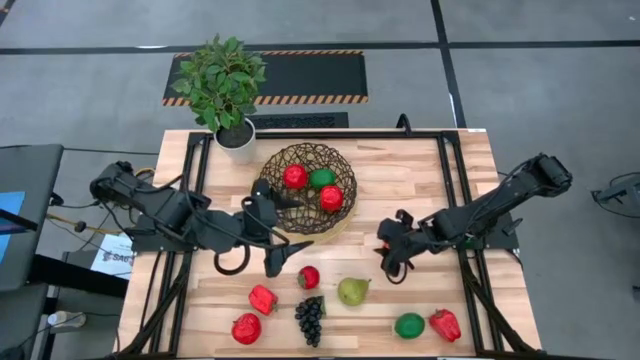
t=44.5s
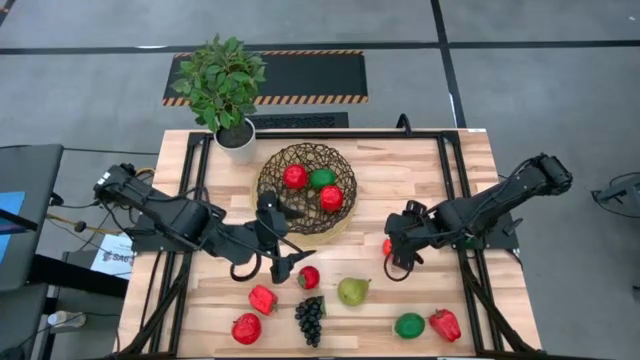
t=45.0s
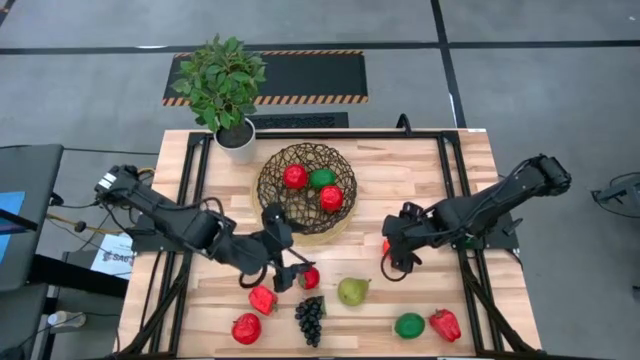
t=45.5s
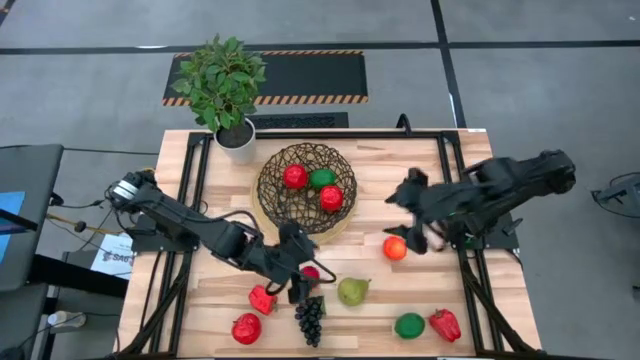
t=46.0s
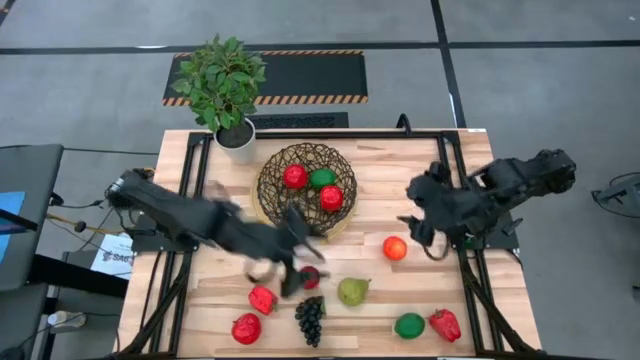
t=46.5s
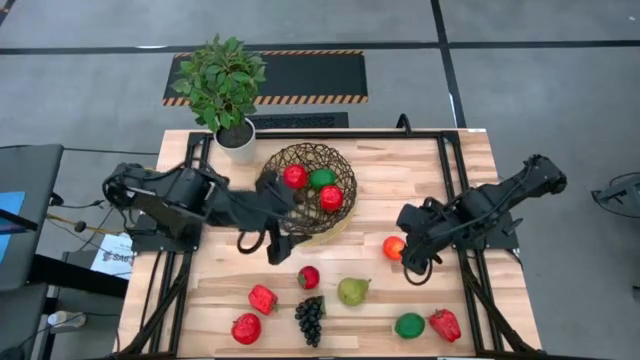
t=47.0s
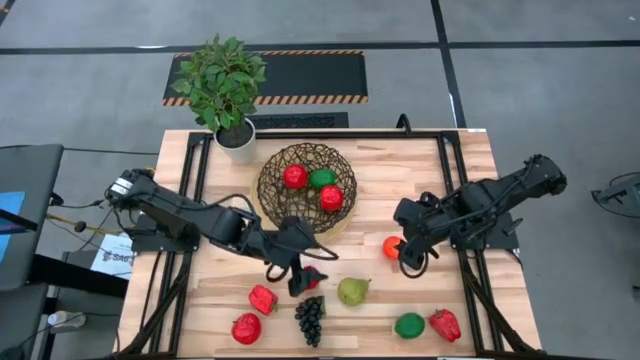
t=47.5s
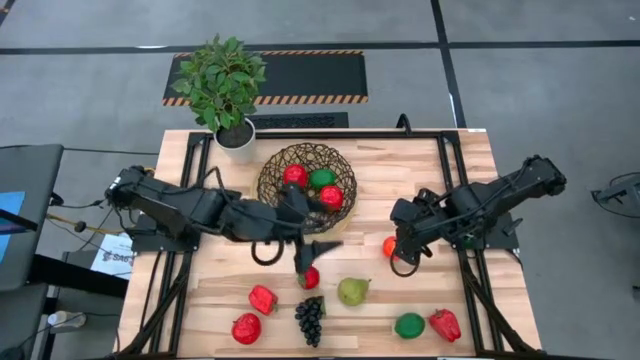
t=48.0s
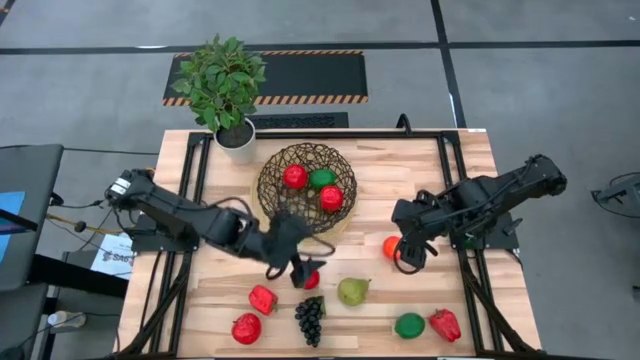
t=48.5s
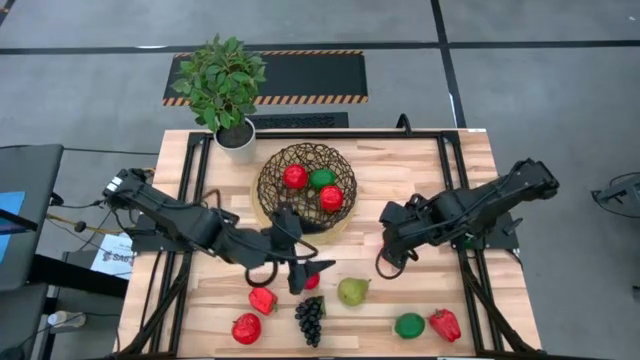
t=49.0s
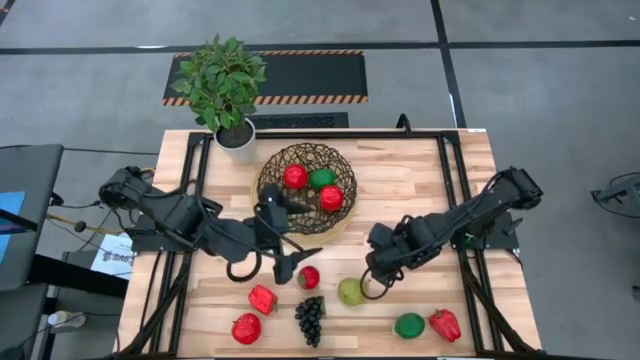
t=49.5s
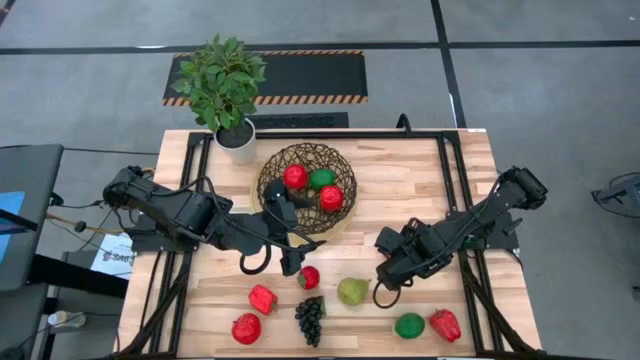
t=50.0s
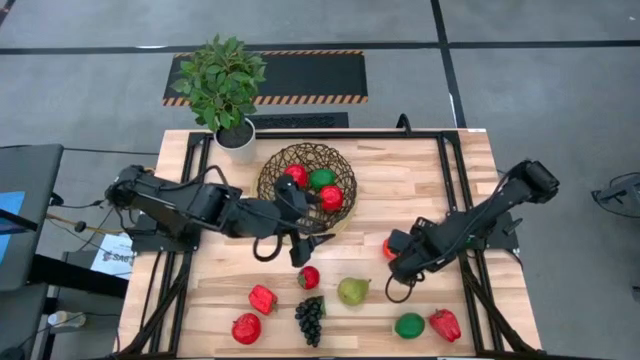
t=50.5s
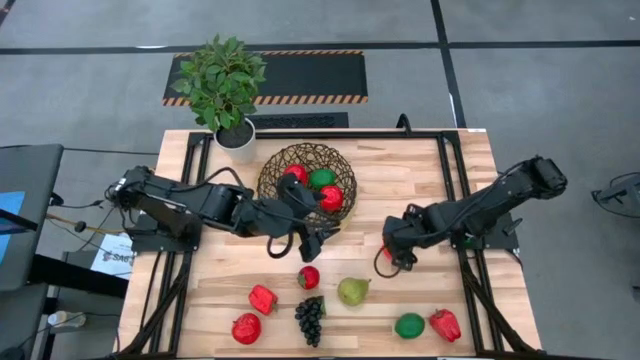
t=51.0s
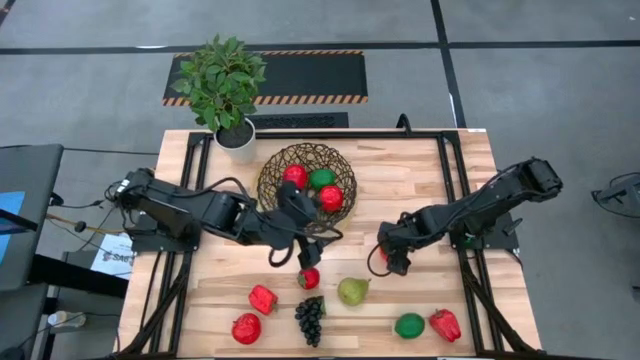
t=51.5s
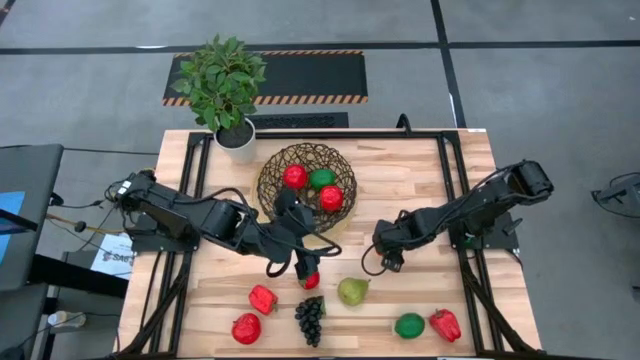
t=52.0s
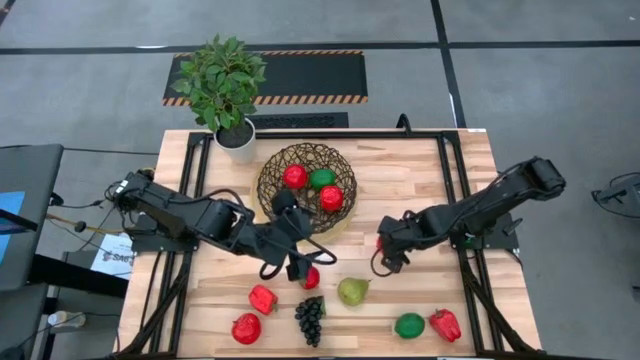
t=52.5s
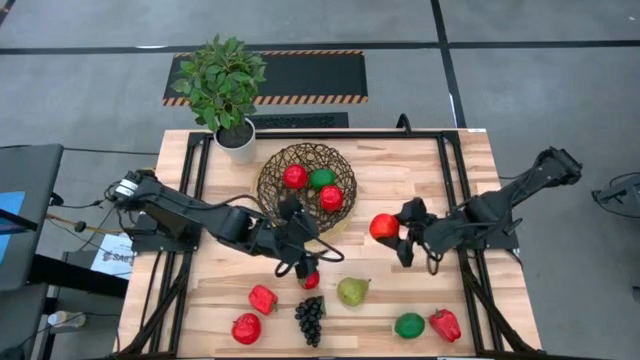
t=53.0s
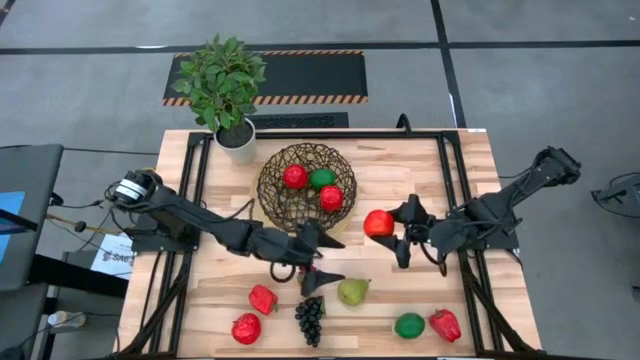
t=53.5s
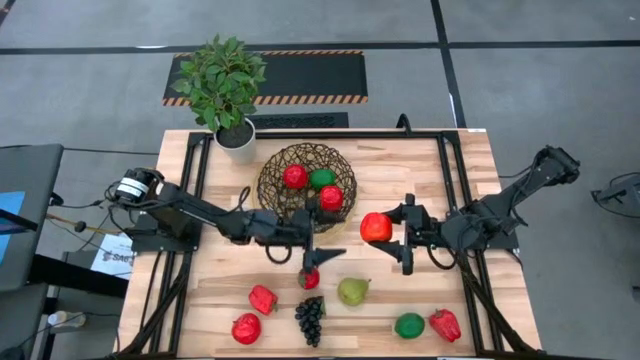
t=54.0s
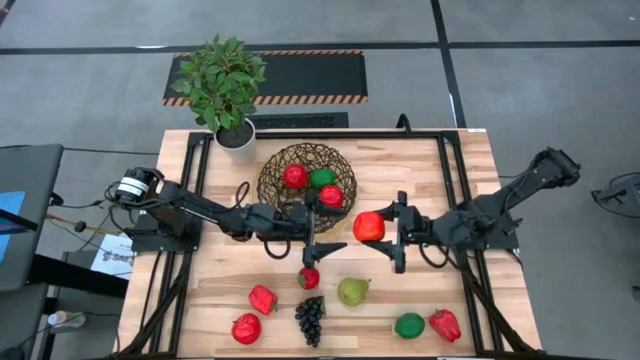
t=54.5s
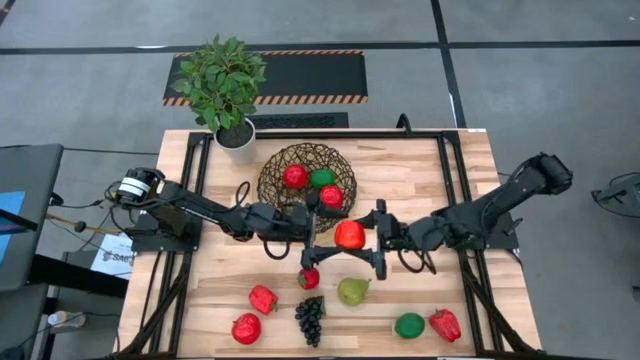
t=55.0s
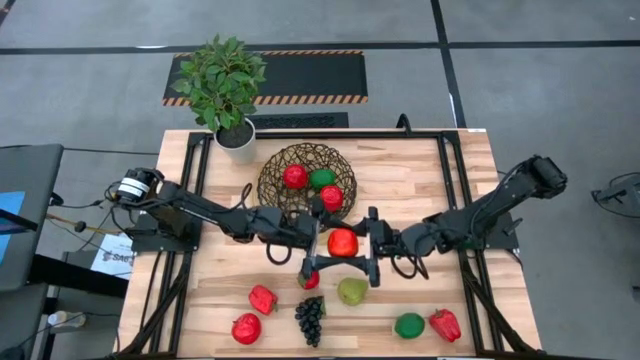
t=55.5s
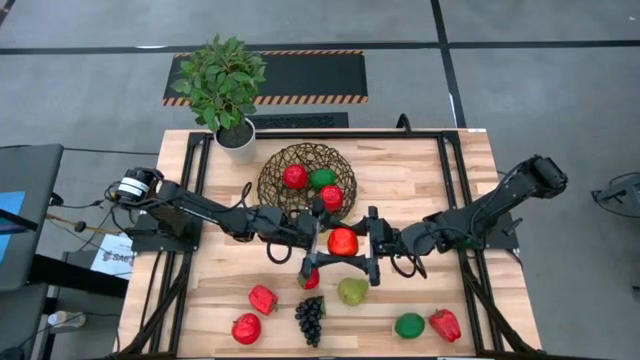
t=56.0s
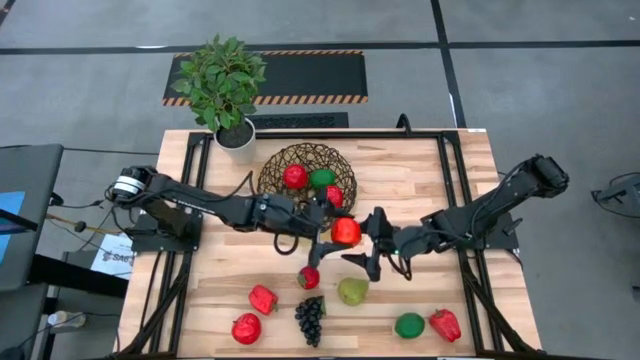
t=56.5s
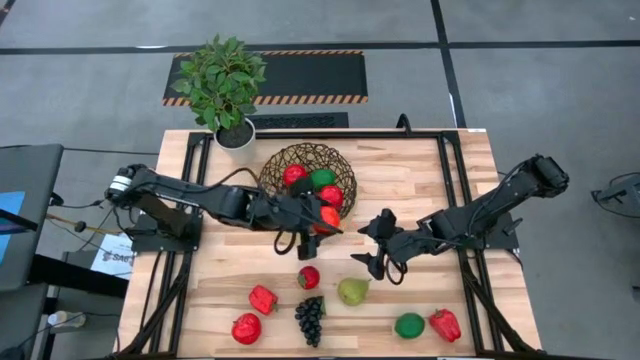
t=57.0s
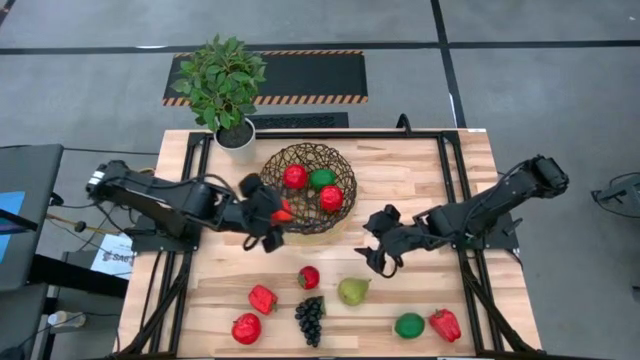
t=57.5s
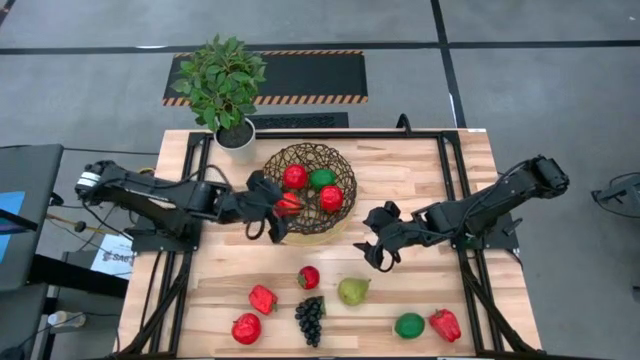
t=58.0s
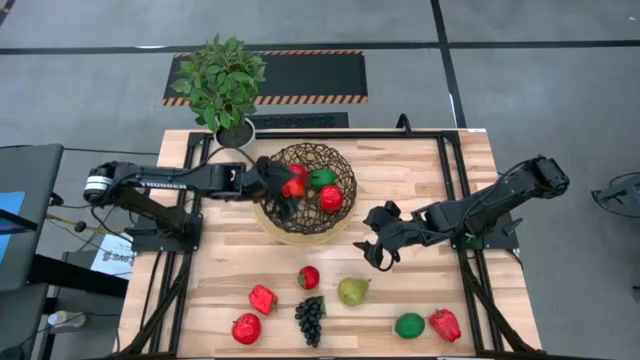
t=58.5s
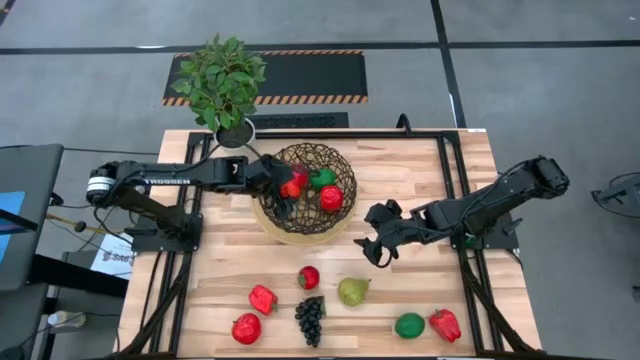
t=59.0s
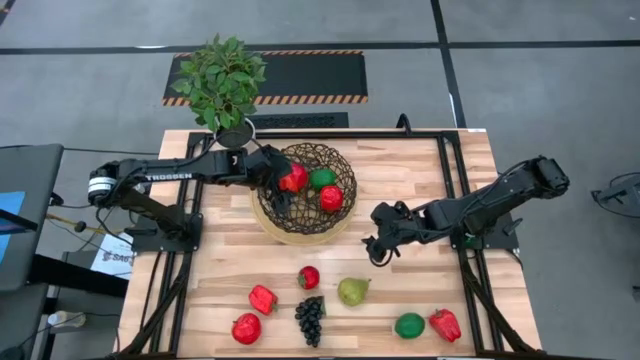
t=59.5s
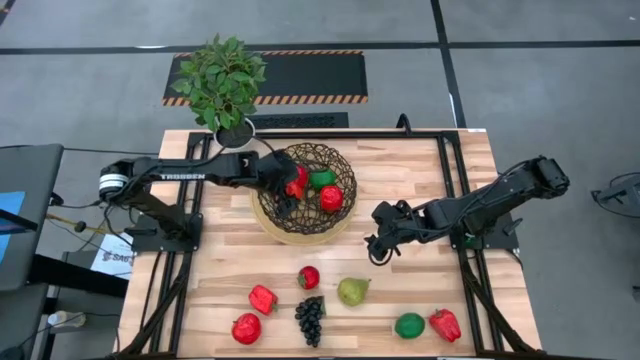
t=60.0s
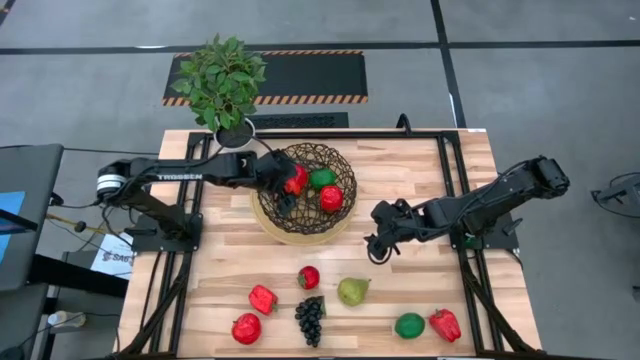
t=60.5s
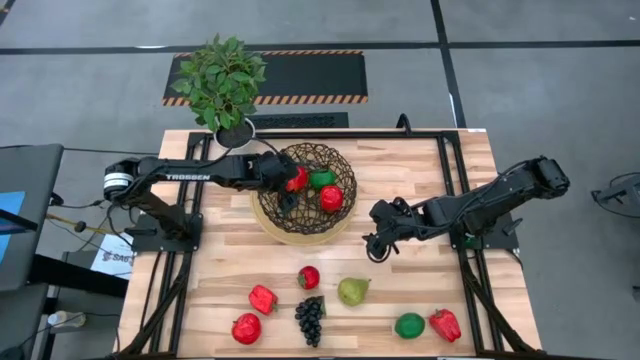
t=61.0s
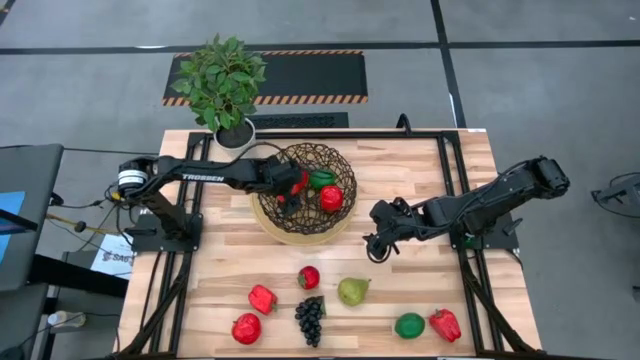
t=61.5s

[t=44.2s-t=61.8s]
Task: Build produce basket
Put the orange apple into the basket

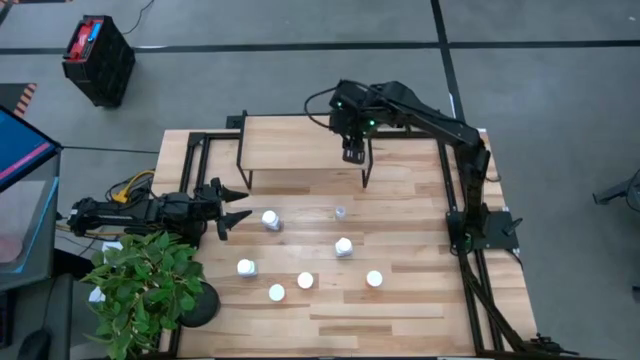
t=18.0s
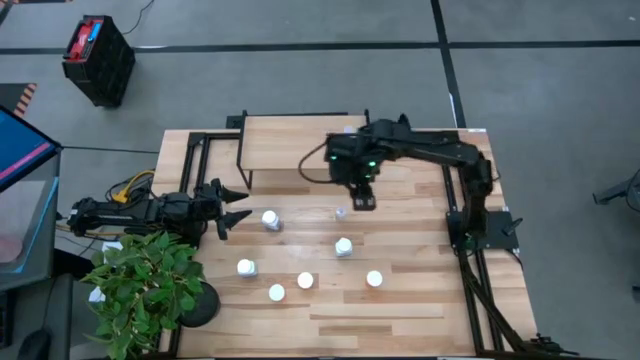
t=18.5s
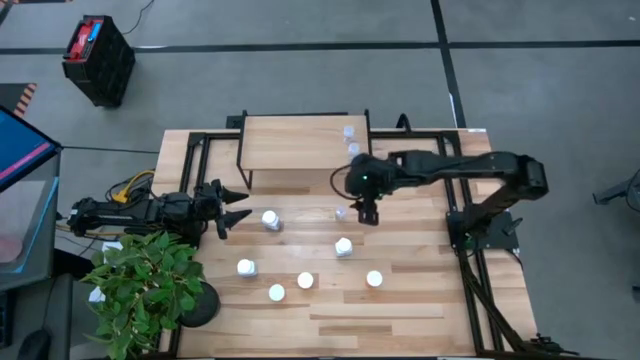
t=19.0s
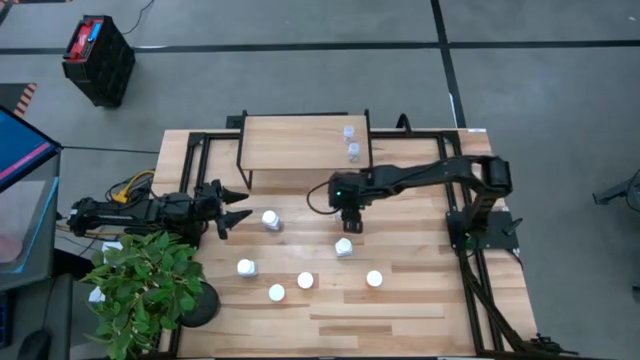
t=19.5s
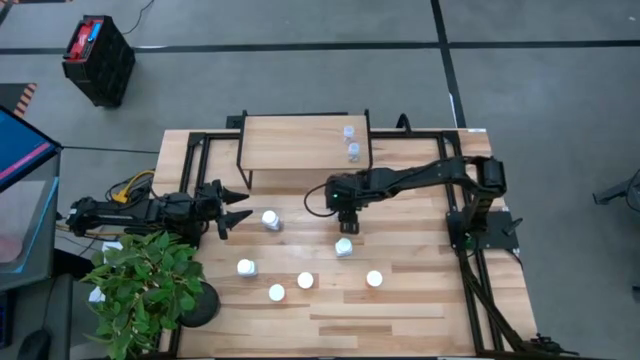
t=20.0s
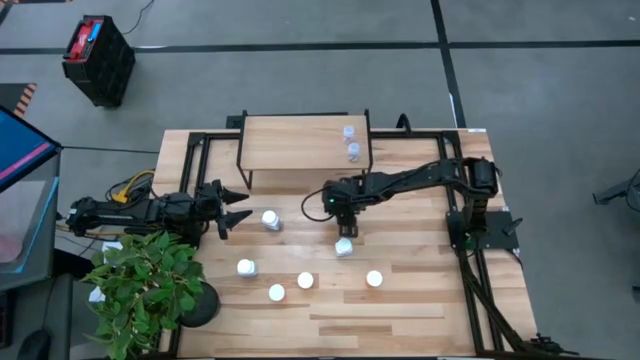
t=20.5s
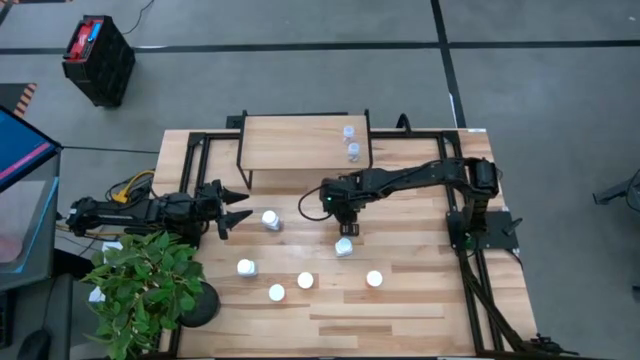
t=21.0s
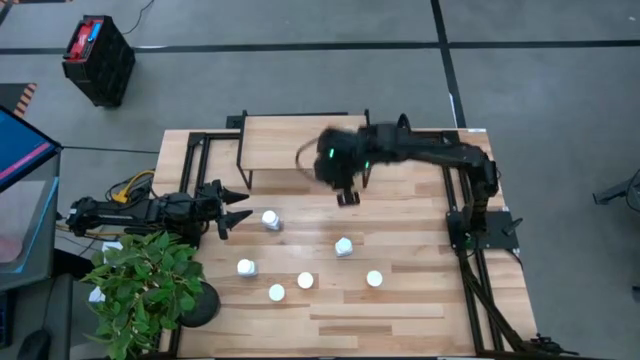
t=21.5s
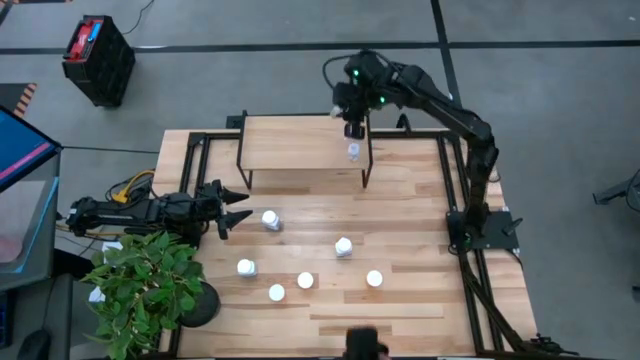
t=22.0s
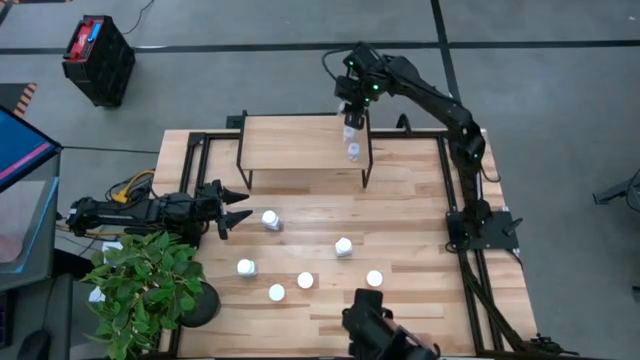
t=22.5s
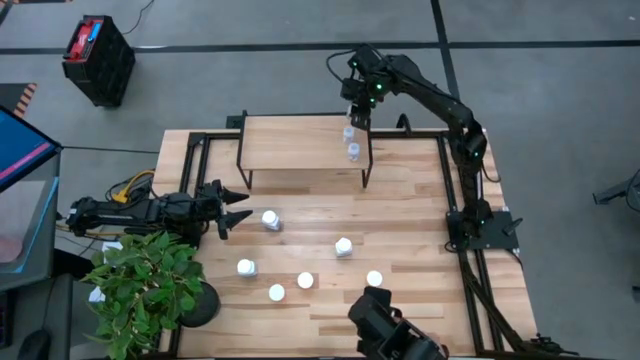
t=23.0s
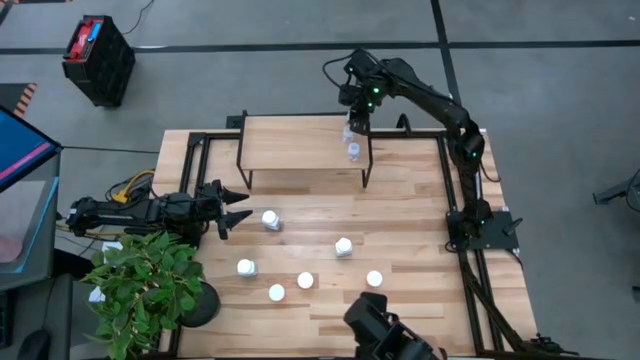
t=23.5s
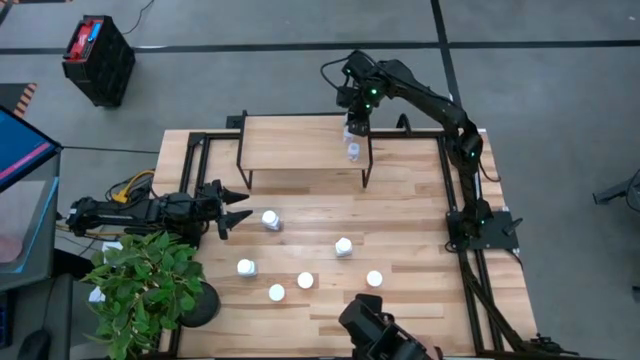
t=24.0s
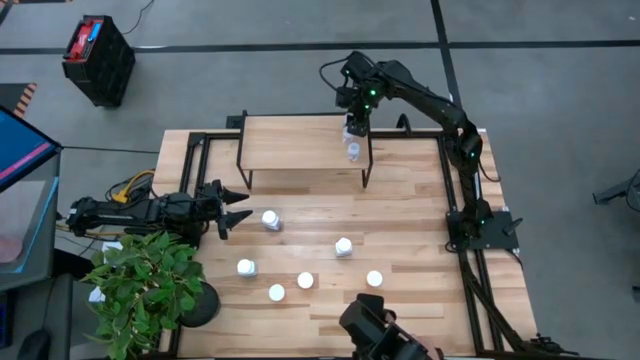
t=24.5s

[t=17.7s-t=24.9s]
Task: Pick and place medicine bottles onto shelf by color
Put the transparent pill bottle on the shelf aligned with the other transparent pill bottles
